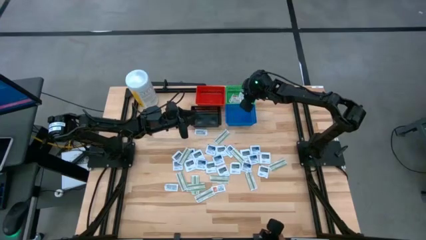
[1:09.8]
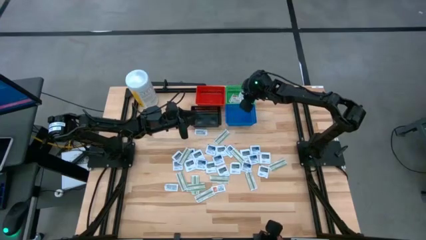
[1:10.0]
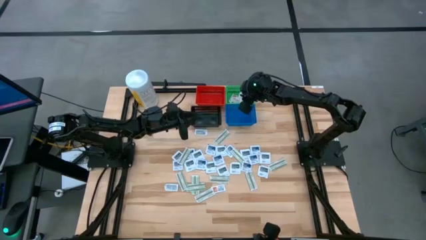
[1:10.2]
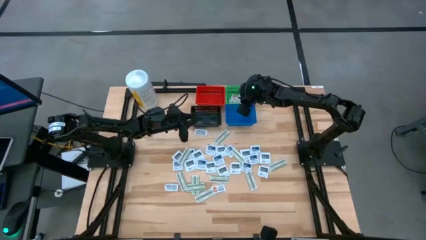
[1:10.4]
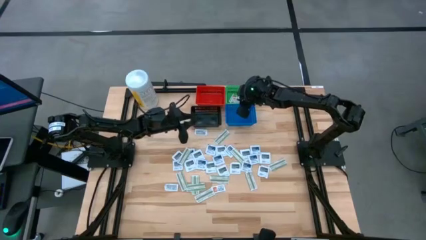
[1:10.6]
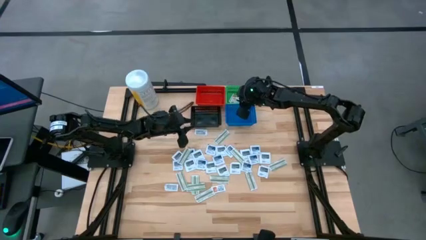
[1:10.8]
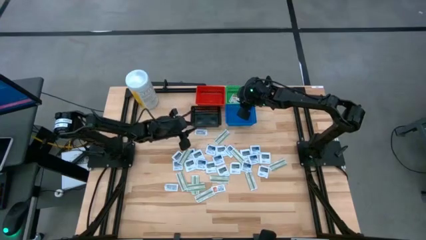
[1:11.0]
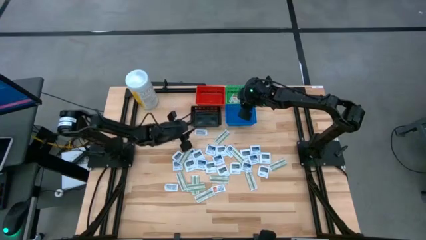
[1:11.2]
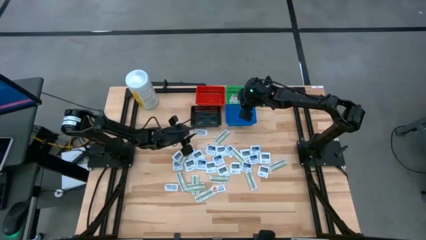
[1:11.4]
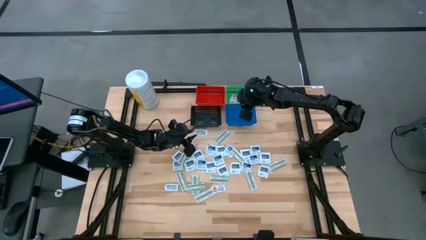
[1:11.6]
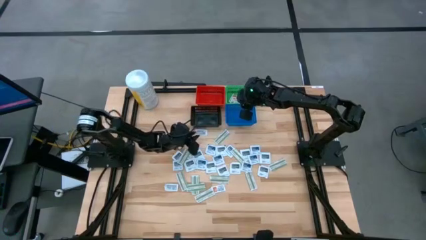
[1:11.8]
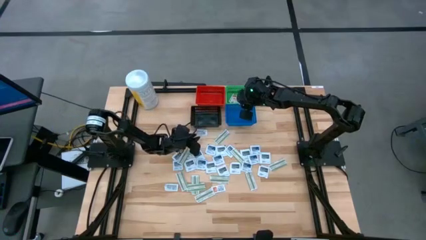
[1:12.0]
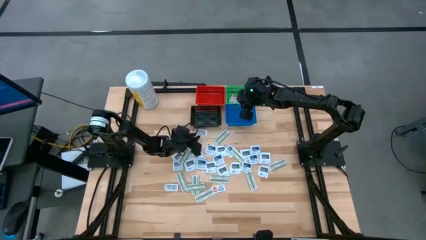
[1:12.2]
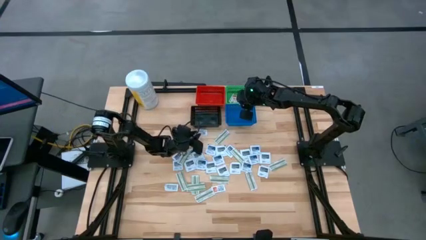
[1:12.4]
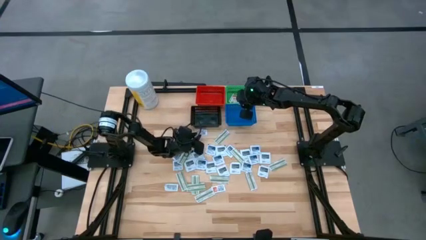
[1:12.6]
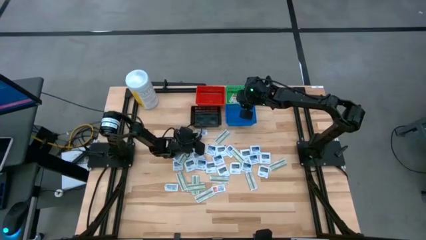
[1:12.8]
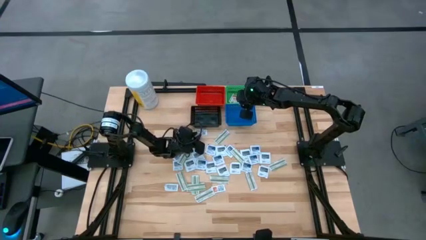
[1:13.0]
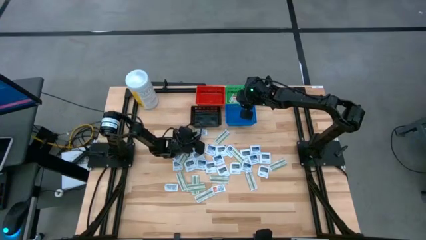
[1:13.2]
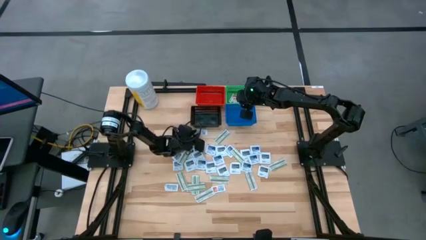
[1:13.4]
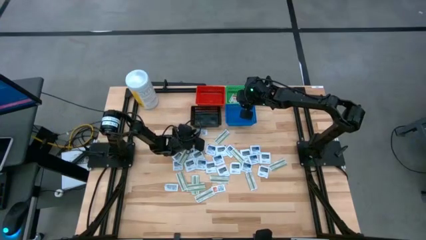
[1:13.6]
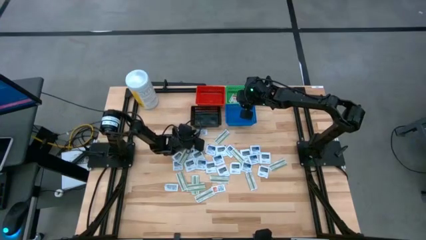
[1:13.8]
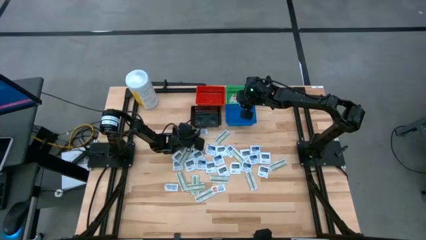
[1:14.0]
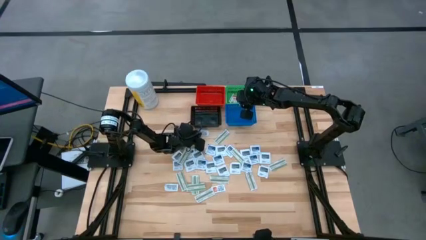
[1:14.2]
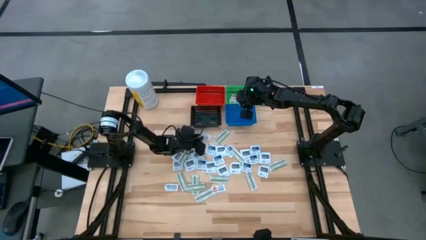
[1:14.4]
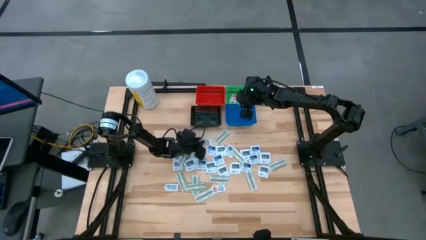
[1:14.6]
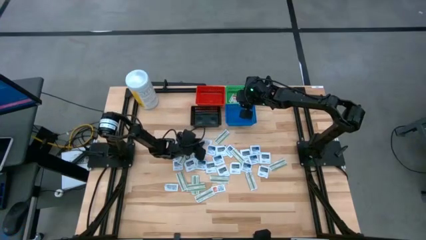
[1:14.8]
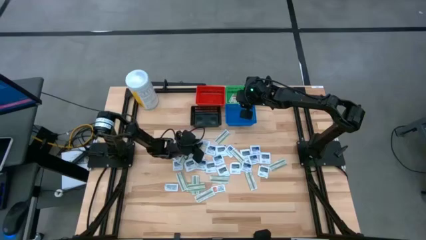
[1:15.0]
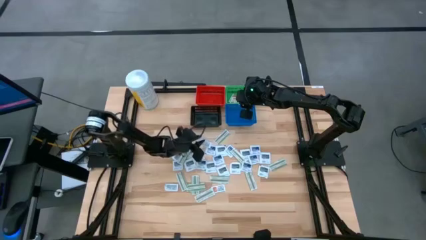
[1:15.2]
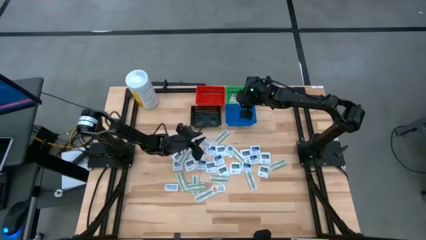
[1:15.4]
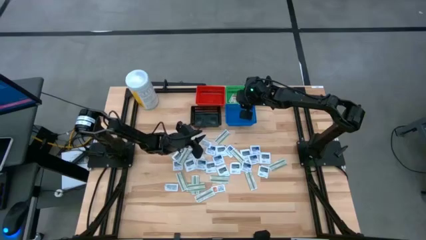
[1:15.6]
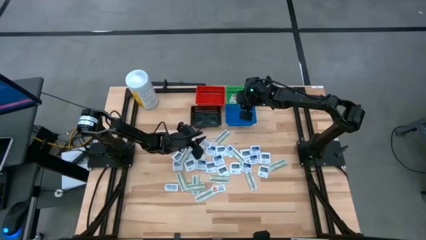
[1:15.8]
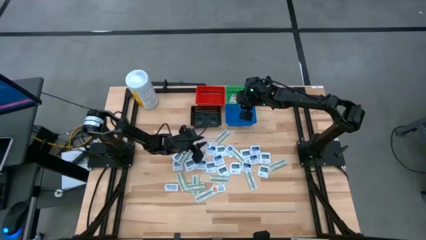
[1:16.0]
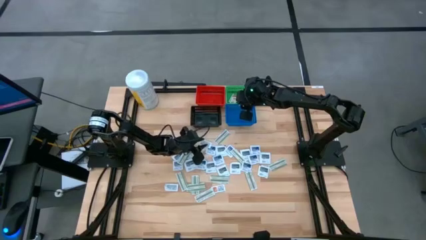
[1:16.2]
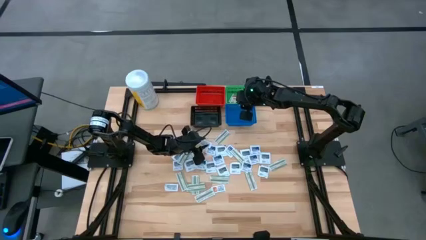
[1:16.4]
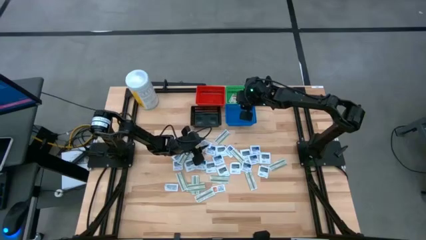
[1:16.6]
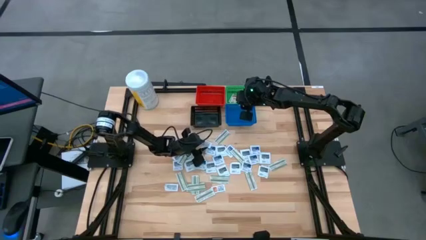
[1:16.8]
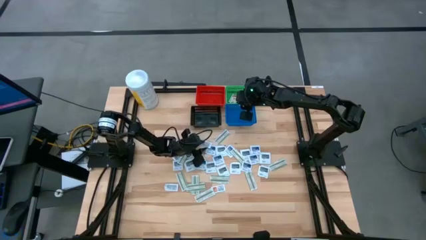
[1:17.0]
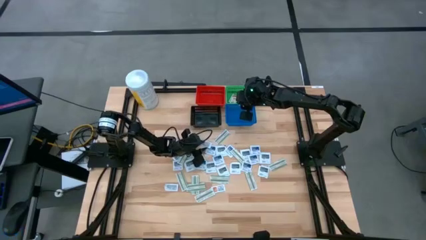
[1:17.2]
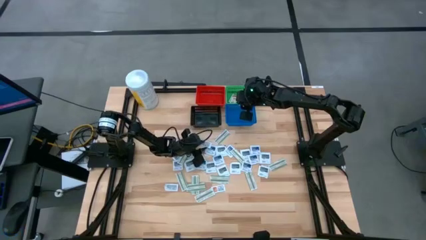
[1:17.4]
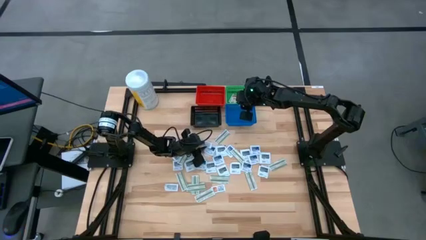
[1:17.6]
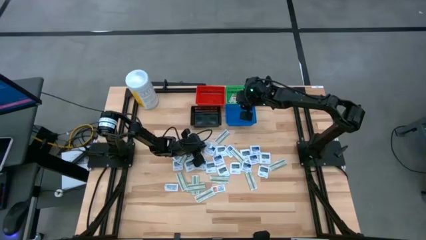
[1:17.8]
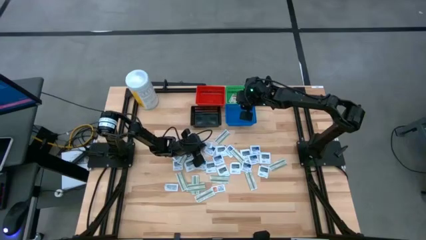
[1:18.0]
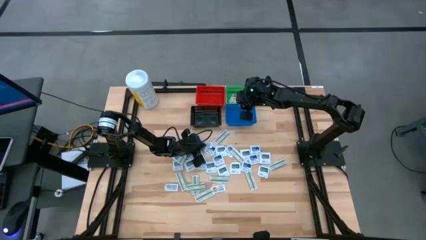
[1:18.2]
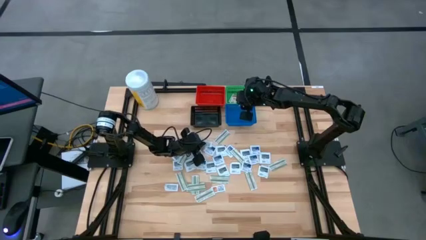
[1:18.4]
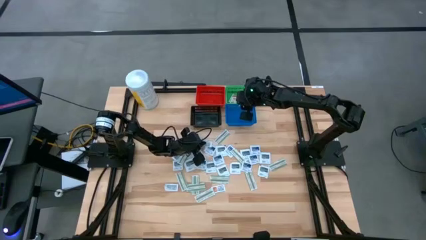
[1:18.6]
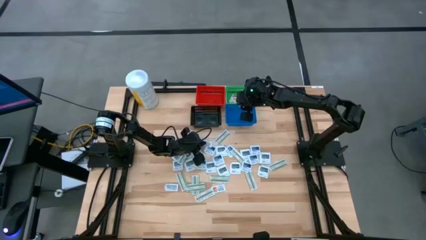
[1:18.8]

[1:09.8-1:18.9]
Task: Pick & Place First Aid Supplies
Put the ointment pack into the green basket

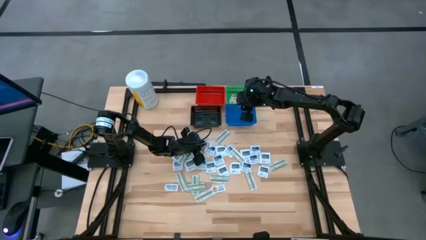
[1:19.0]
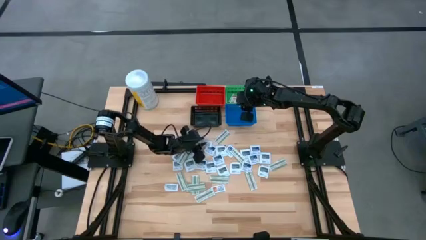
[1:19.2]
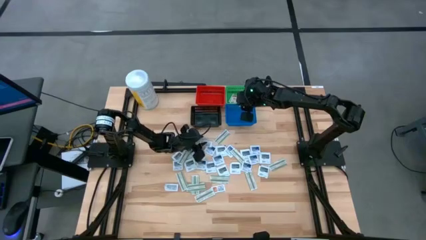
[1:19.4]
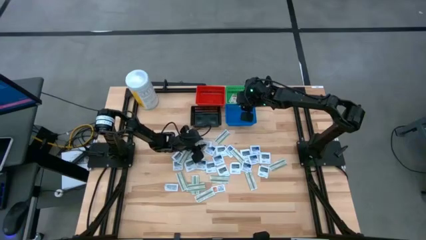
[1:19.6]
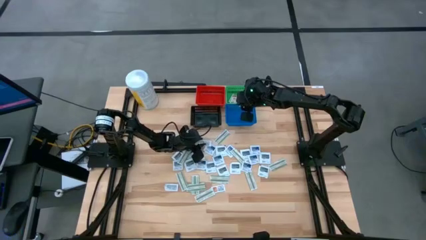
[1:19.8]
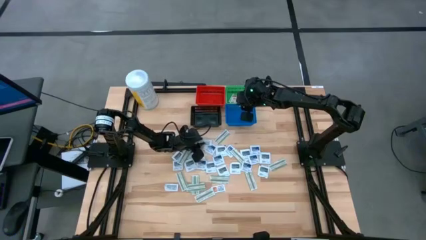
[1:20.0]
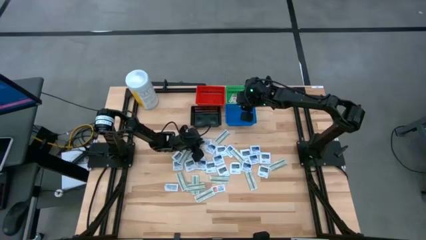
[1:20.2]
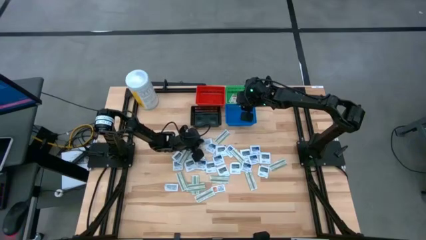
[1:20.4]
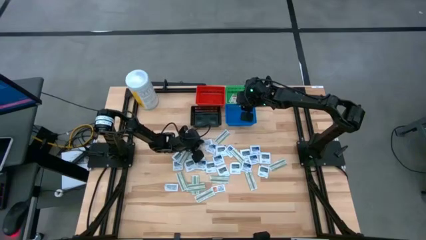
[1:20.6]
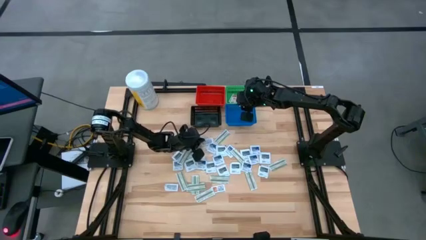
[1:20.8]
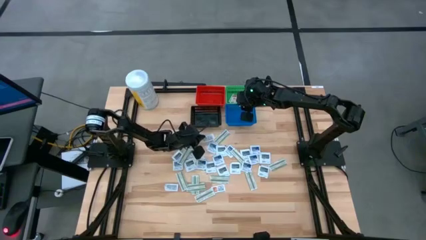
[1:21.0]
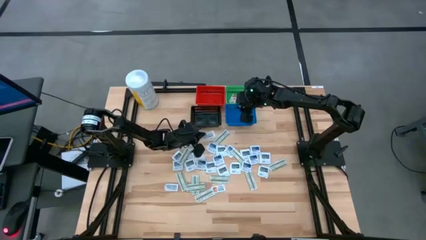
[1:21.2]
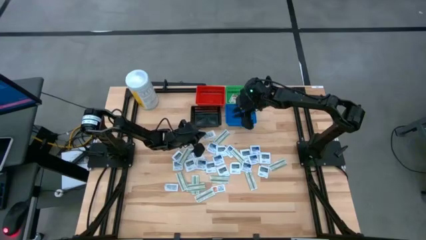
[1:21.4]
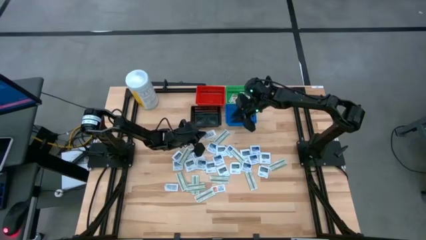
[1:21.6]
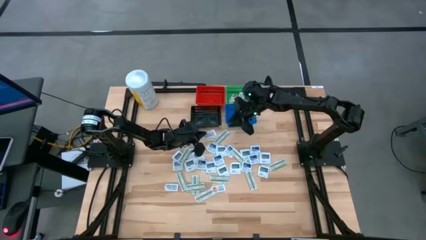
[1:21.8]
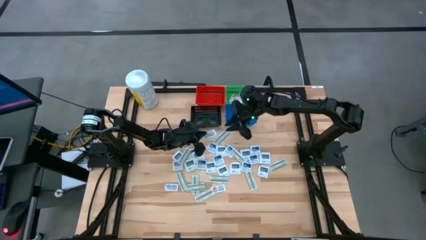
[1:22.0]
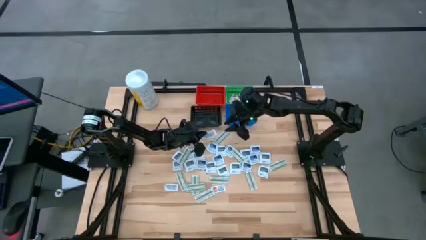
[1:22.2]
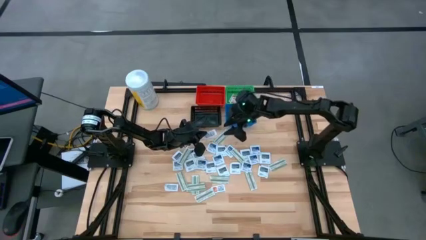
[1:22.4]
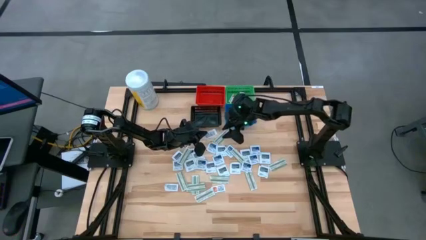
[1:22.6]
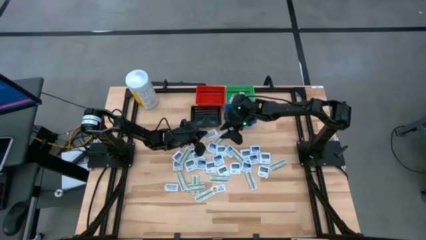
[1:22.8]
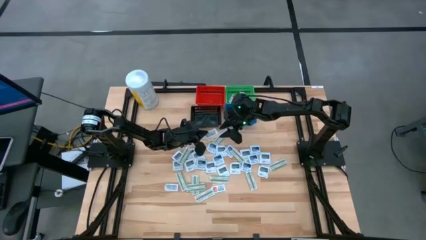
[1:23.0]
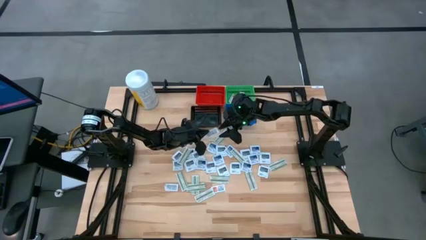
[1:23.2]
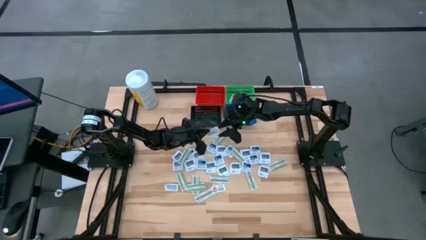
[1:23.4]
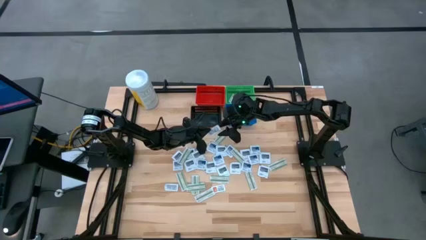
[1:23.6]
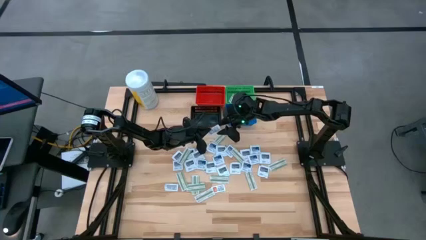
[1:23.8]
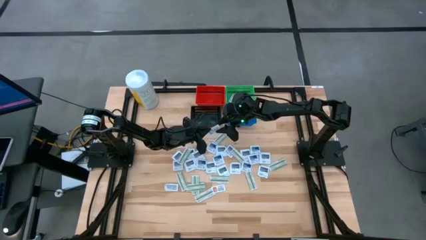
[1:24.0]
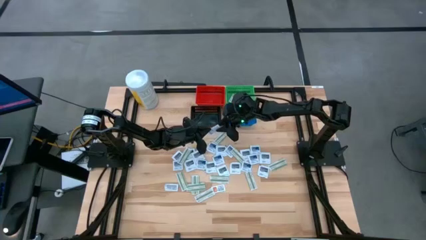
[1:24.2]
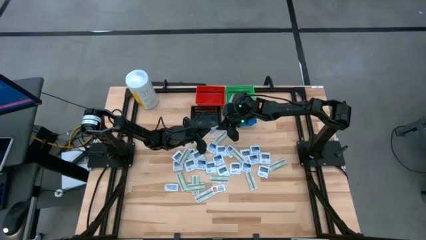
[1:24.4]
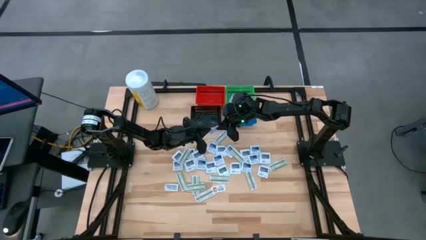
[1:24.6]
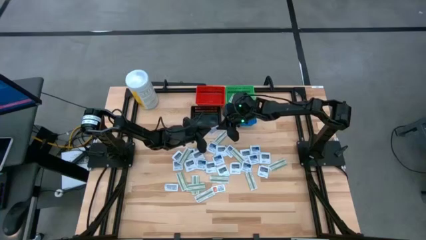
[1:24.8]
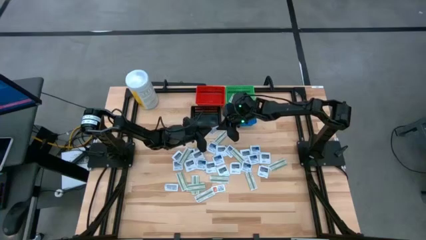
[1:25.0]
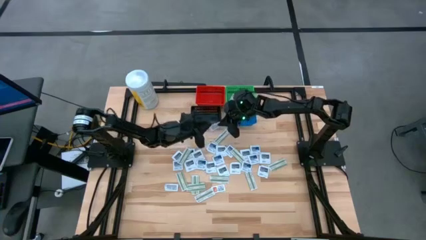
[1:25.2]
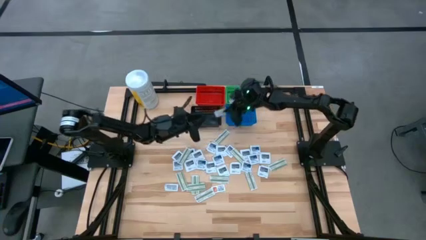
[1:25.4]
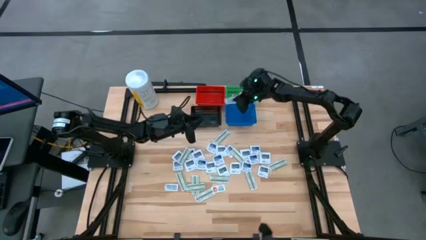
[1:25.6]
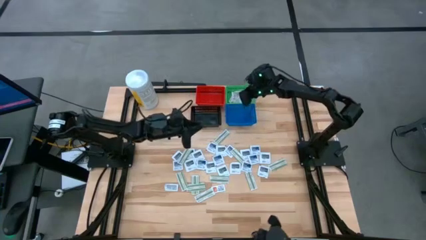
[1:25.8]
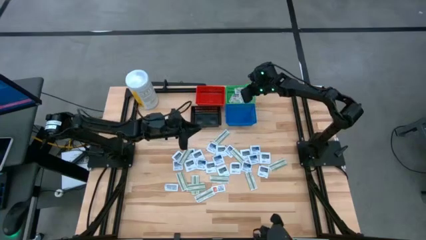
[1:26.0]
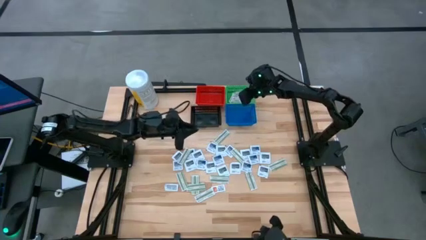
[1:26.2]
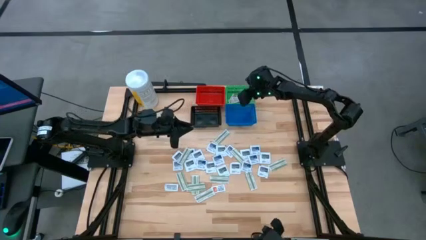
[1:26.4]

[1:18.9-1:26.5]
Put the ointment pack into the green basket
